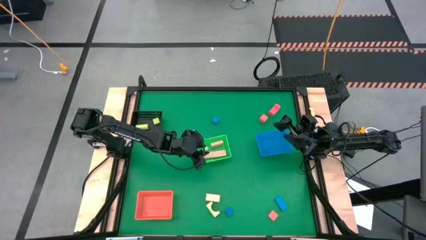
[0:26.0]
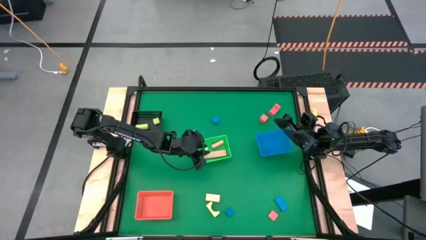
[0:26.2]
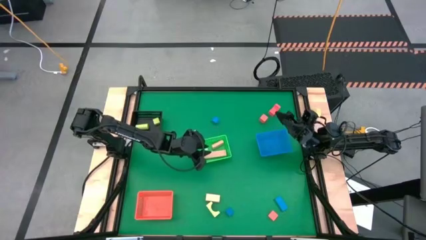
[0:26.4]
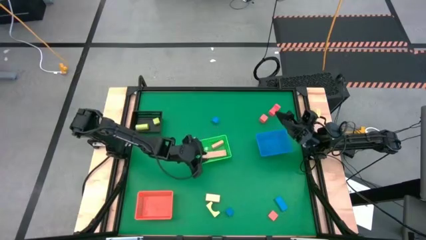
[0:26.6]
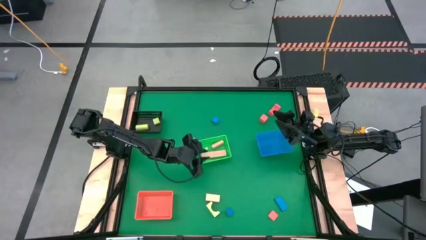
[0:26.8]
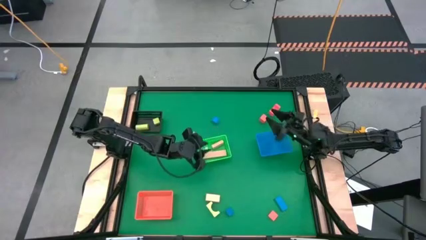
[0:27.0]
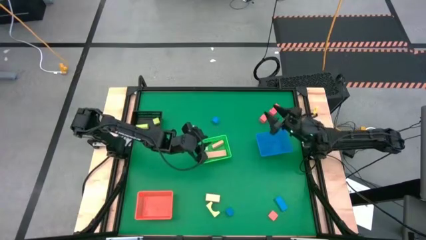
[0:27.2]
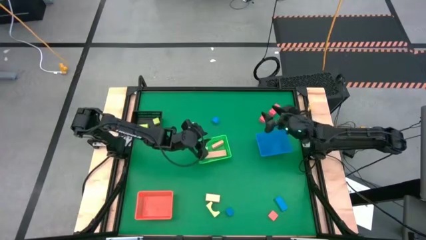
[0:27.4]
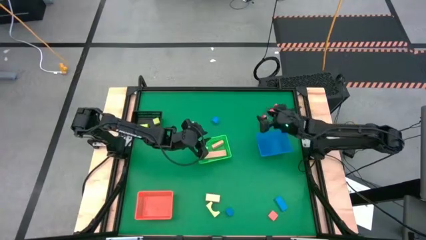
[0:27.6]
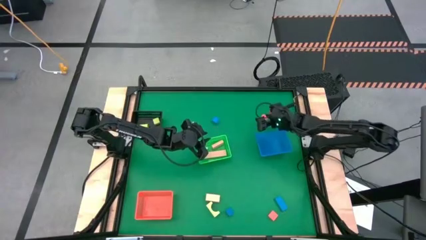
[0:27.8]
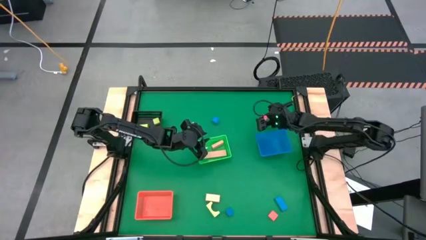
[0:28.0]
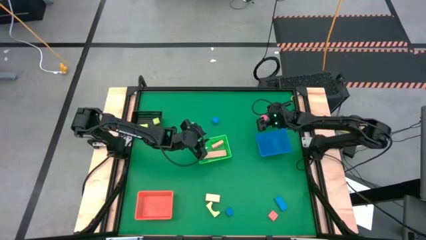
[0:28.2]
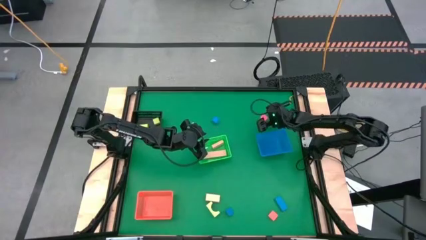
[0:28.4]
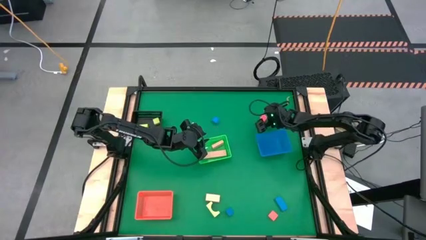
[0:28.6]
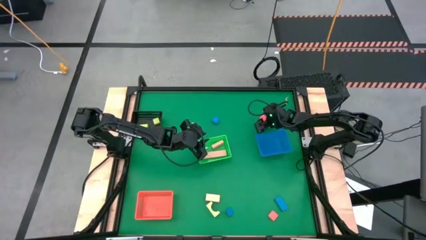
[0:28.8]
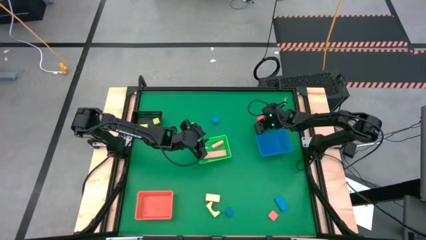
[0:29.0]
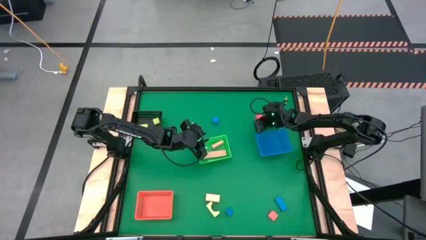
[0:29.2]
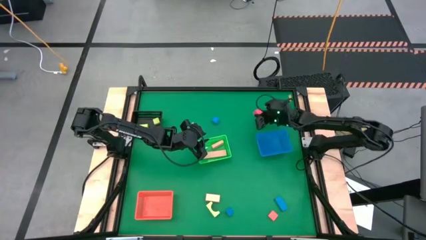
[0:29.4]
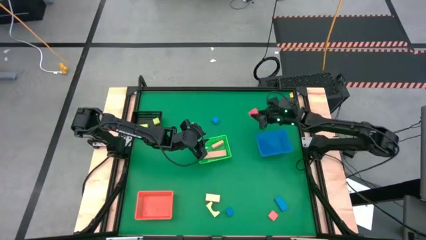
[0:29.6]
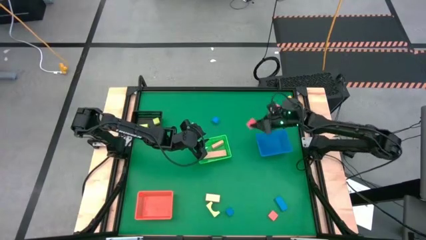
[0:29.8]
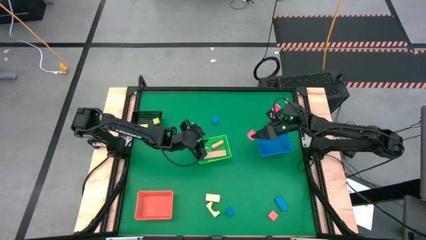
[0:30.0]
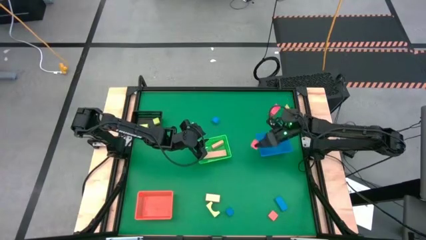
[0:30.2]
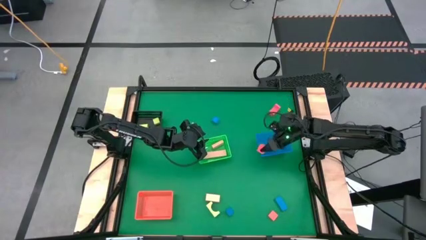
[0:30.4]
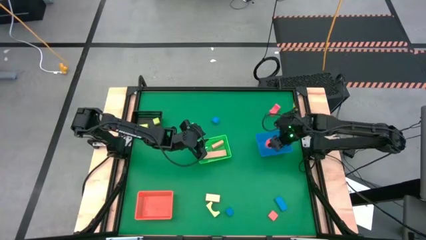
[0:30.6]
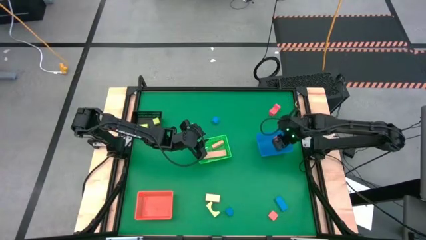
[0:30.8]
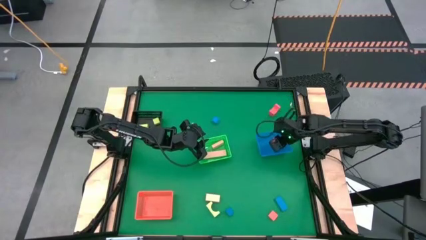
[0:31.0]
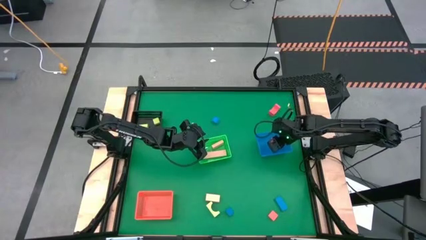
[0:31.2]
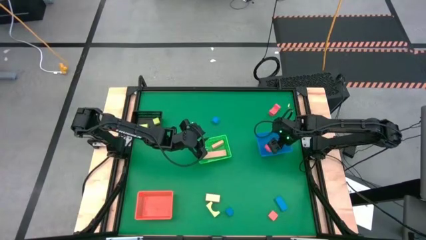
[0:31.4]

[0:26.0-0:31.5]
Task: Sort & place blocks by color
Put the top left red block into the blue bin

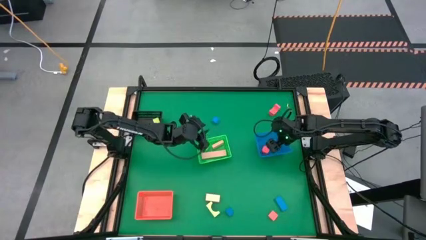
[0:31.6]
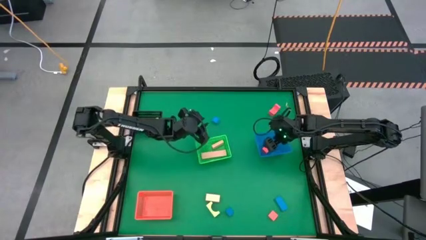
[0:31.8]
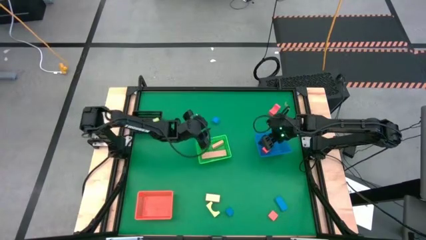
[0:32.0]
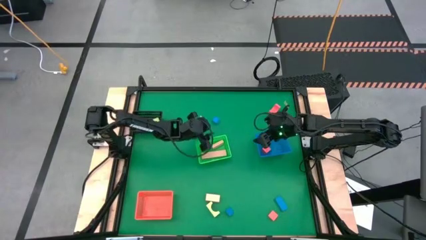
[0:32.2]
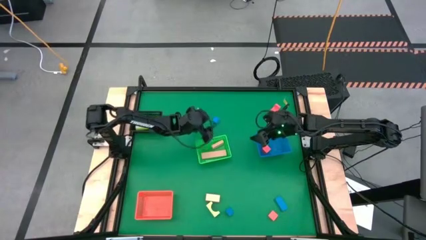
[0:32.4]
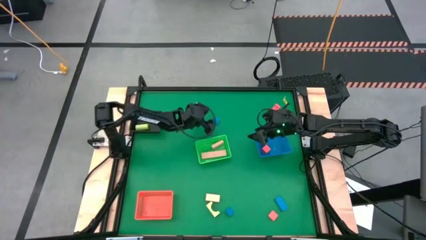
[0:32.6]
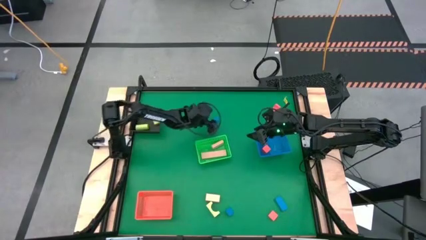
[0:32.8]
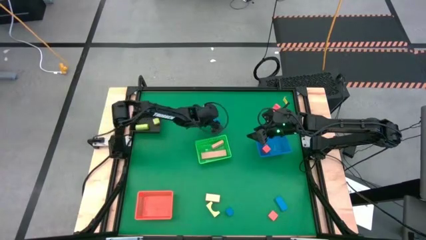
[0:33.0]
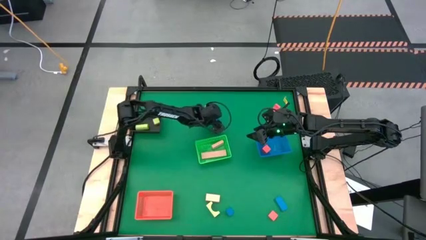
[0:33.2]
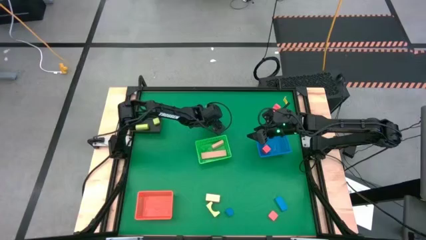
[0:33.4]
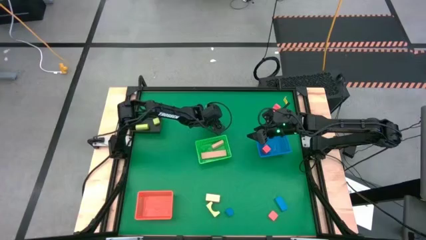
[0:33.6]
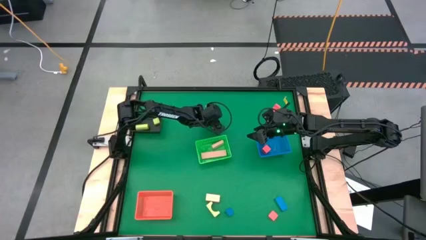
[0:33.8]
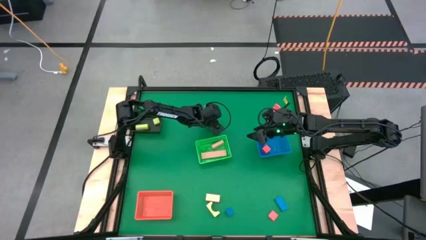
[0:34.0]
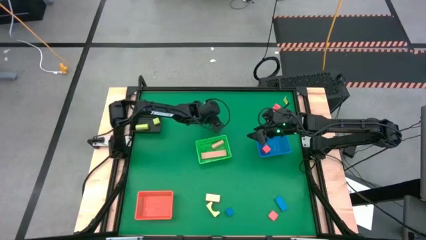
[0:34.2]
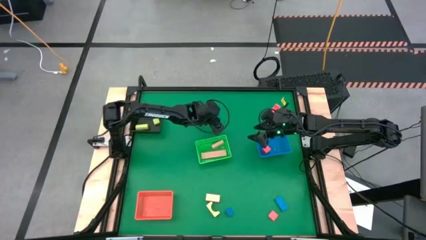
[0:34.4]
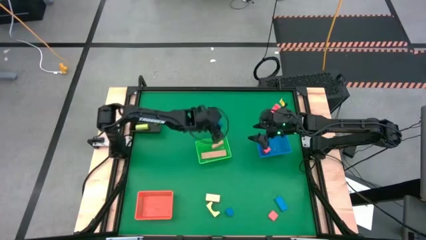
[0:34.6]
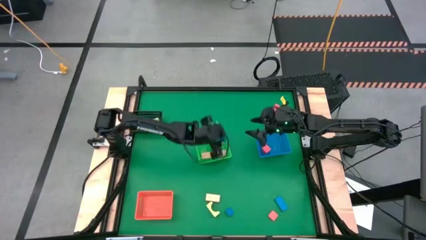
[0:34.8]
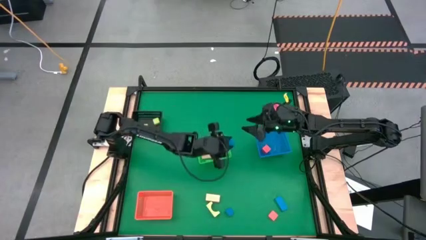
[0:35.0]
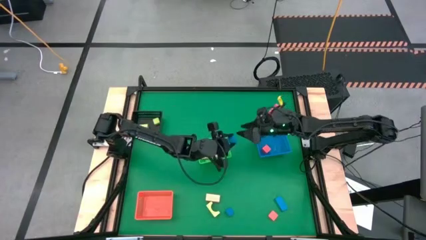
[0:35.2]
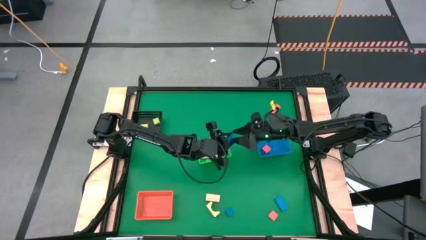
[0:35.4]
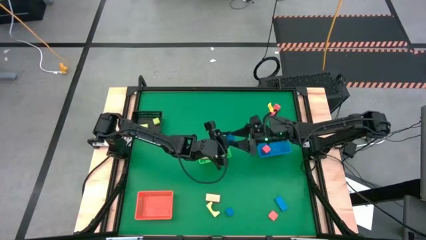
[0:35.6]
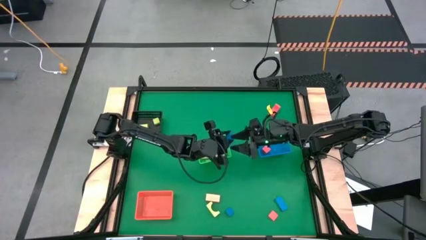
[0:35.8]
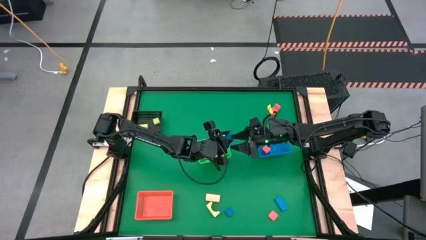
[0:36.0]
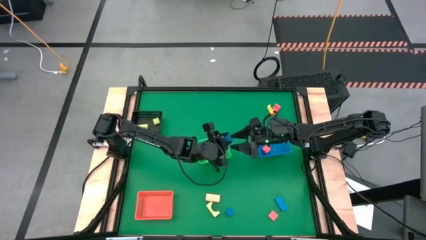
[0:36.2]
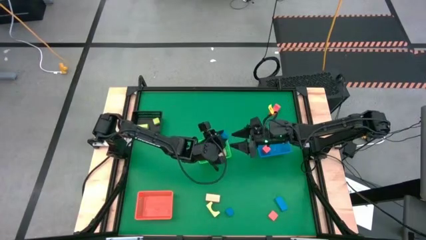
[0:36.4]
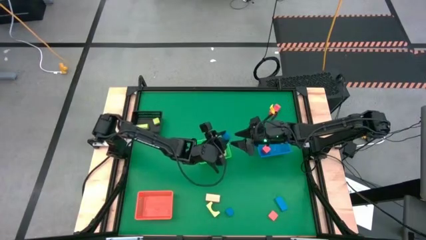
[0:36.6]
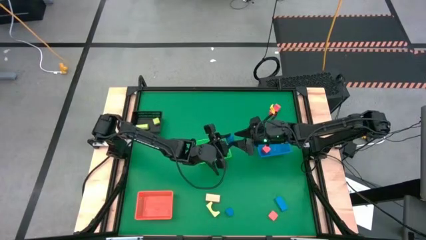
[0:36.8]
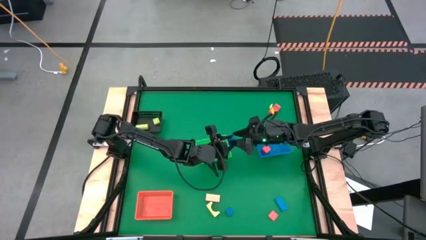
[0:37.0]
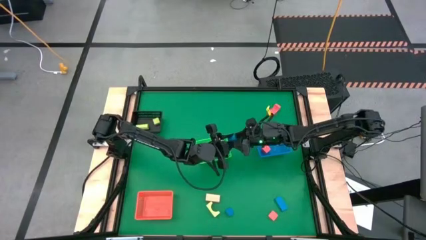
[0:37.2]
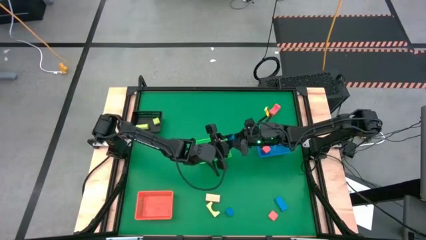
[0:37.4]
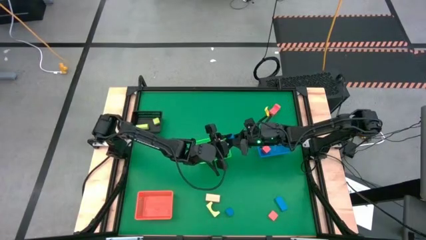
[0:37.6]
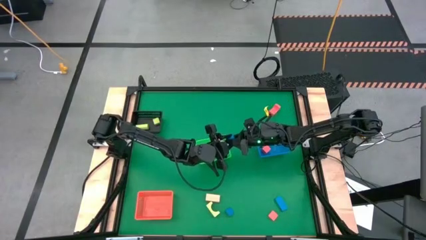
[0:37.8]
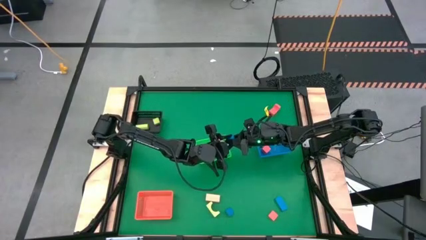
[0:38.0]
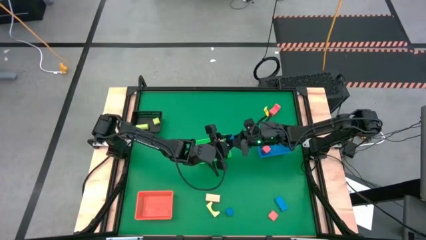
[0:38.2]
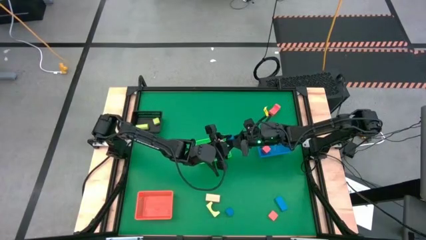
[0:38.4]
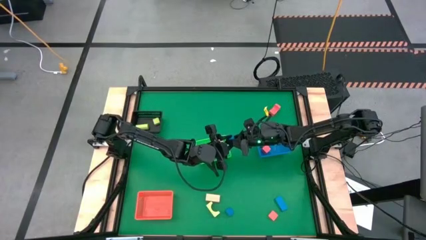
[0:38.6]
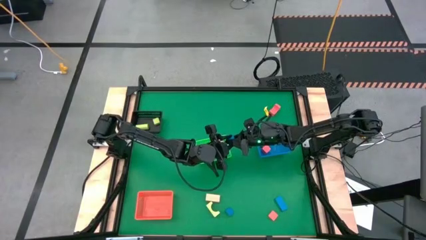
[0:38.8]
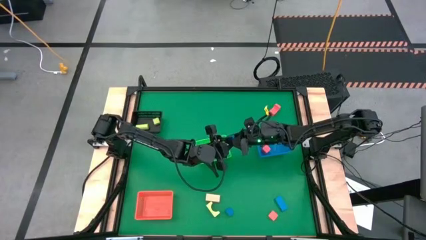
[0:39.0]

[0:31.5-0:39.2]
Put the top blue block into the red bin

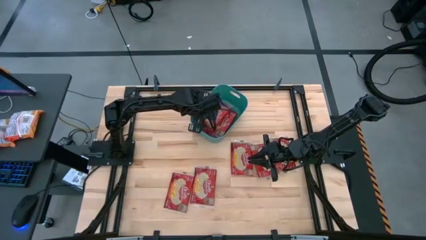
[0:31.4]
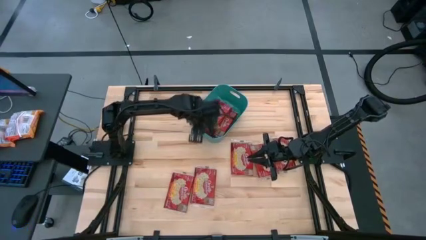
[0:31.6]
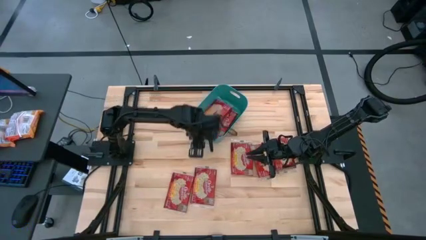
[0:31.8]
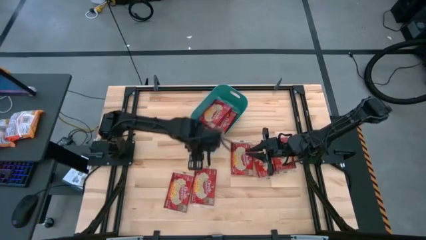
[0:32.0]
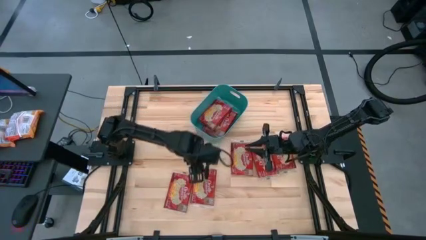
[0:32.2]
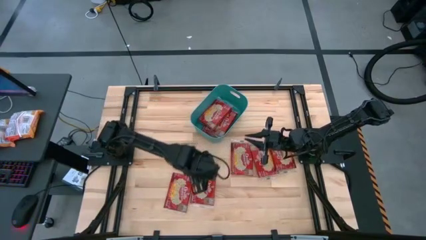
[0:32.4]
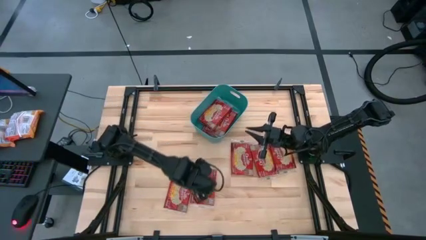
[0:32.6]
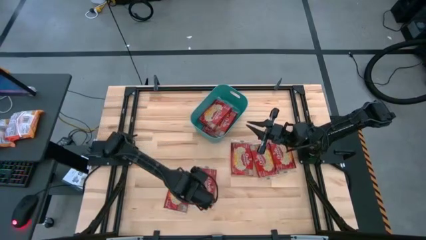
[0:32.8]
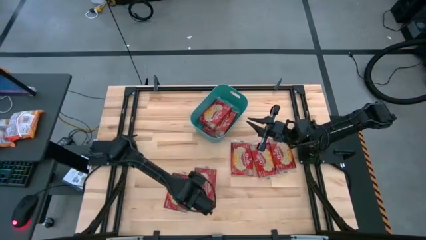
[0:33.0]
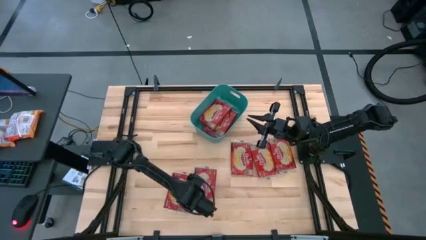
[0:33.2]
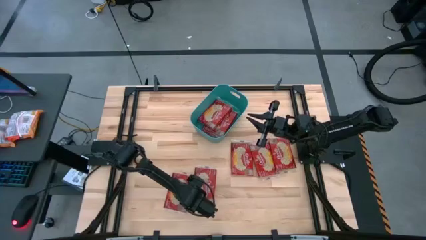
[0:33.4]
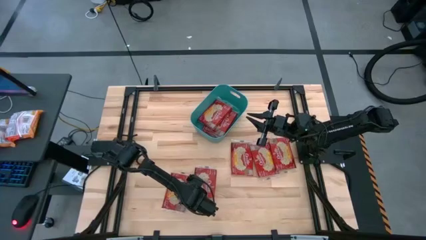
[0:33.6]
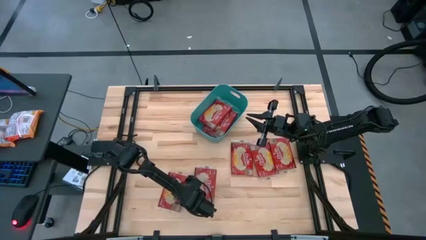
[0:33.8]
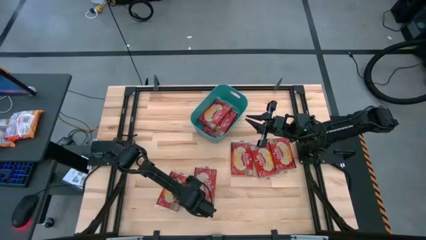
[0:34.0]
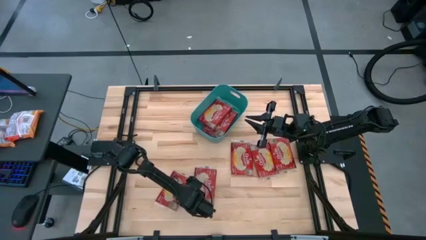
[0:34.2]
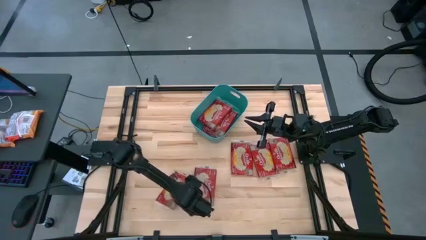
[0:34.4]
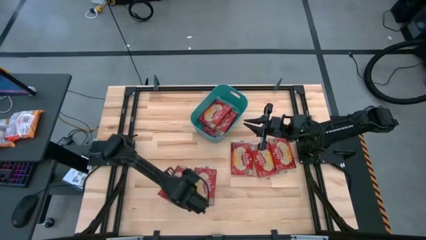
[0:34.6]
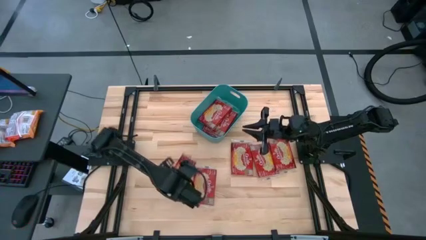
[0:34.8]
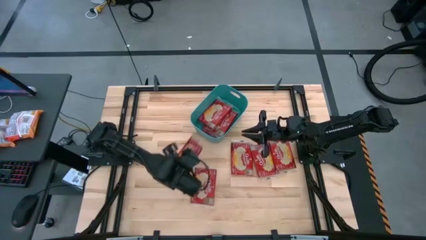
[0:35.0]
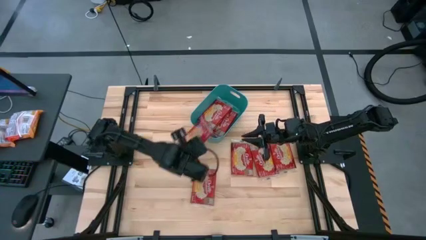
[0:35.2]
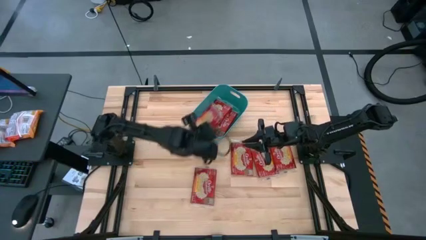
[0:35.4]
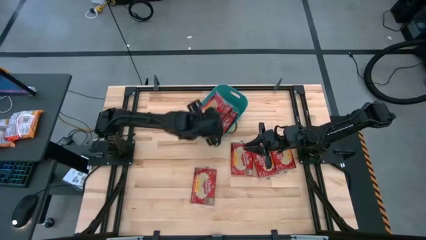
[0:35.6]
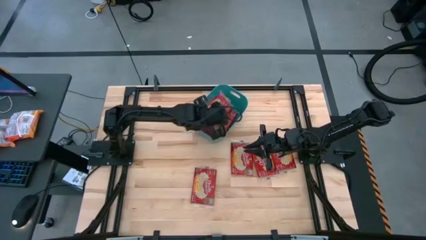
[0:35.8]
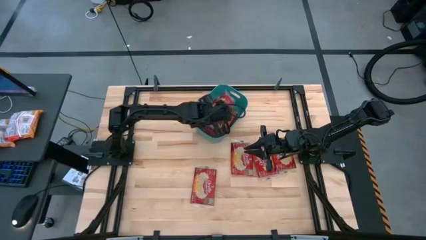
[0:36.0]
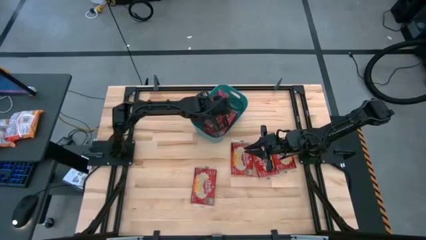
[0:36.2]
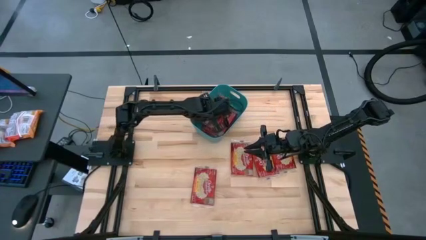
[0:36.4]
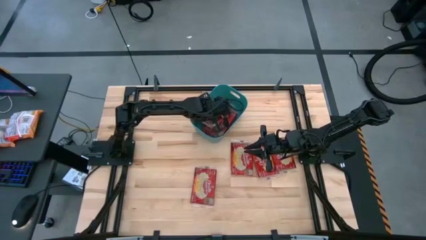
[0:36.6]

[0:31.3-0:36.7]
Task: Sort popcorn bags into baskets
Put the popcorn pack into the blue bin
